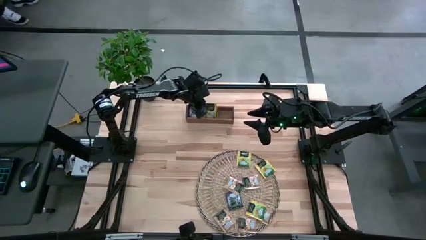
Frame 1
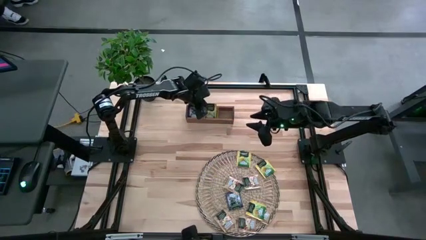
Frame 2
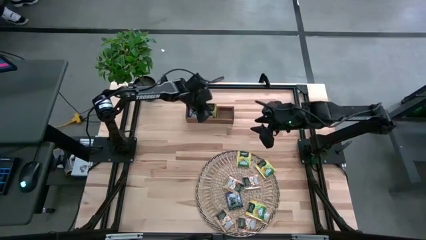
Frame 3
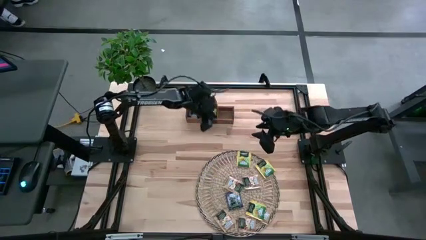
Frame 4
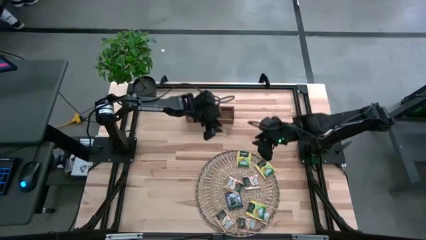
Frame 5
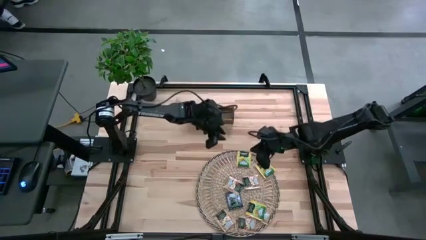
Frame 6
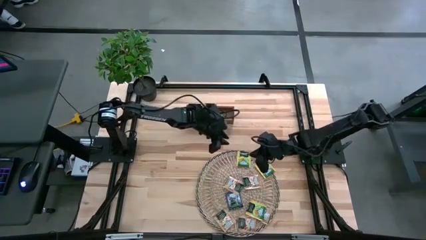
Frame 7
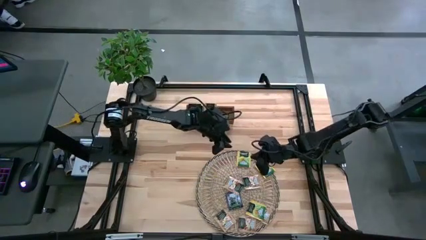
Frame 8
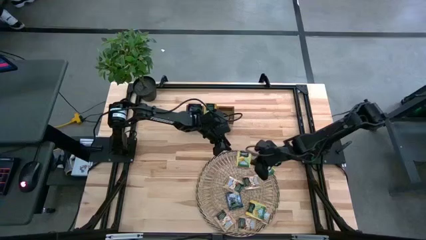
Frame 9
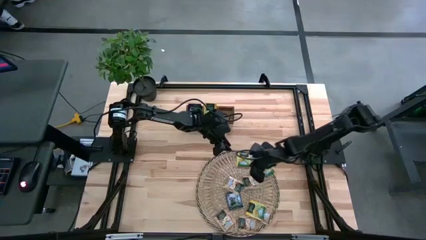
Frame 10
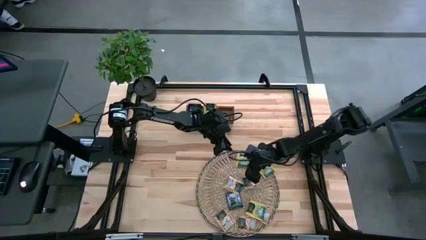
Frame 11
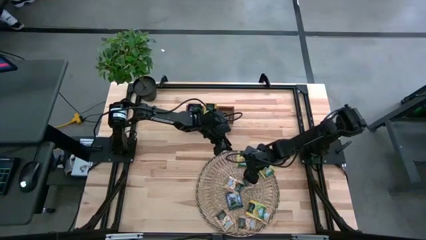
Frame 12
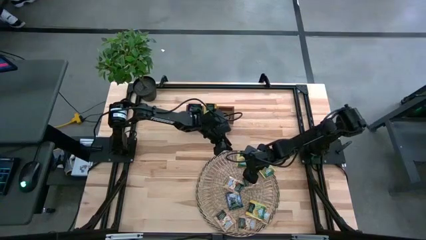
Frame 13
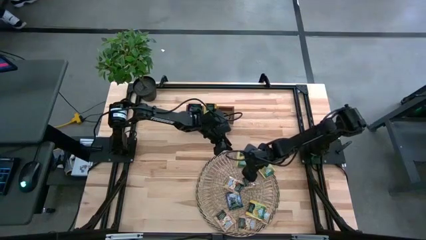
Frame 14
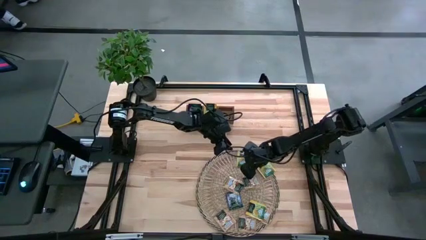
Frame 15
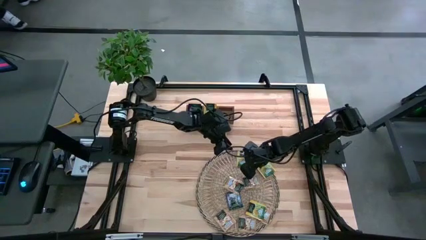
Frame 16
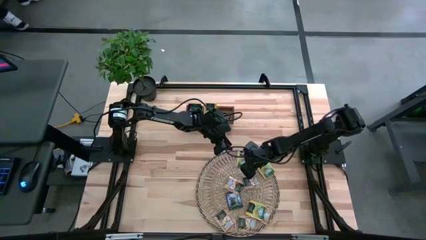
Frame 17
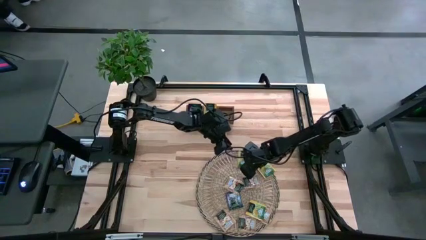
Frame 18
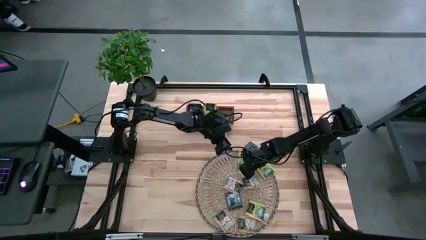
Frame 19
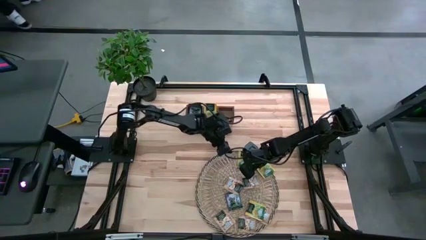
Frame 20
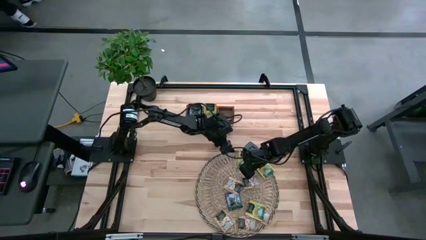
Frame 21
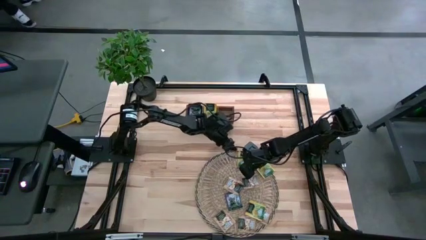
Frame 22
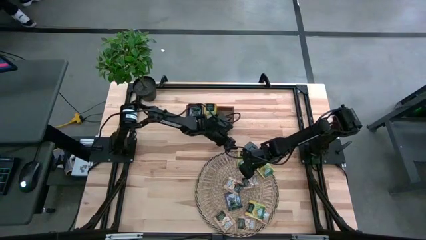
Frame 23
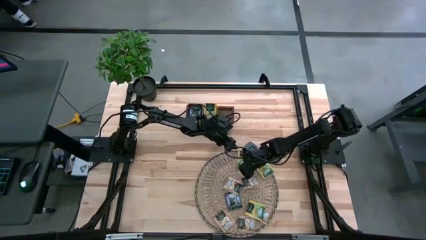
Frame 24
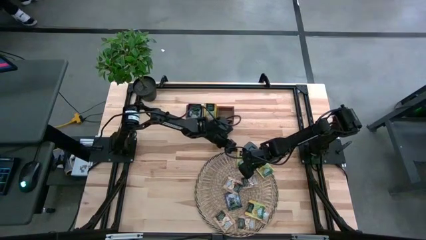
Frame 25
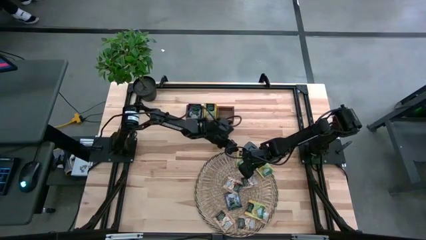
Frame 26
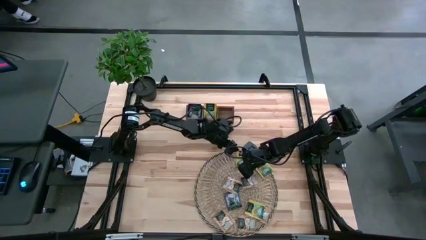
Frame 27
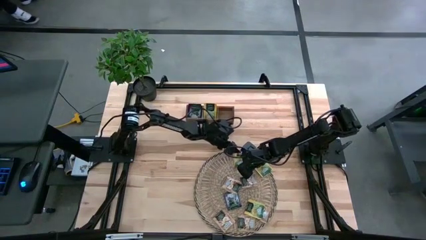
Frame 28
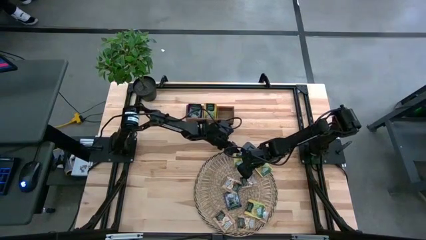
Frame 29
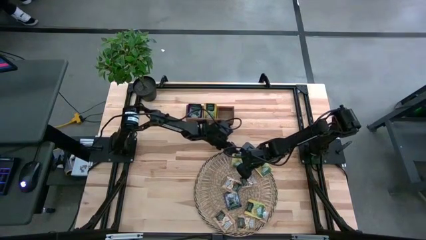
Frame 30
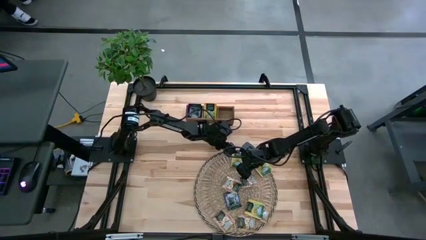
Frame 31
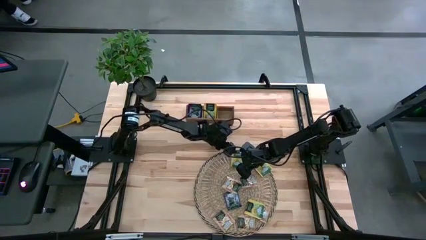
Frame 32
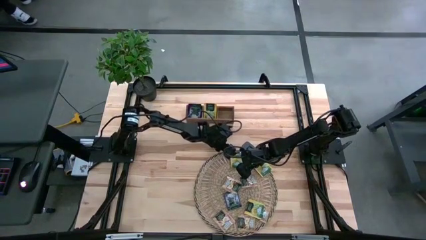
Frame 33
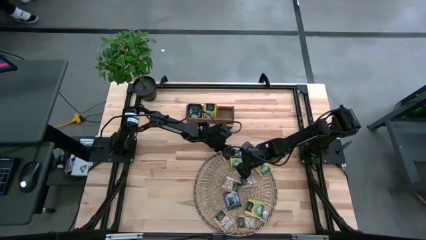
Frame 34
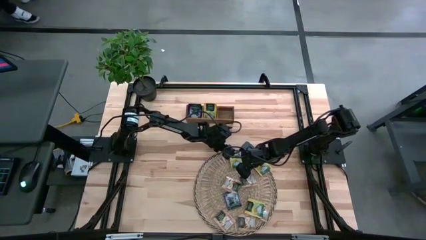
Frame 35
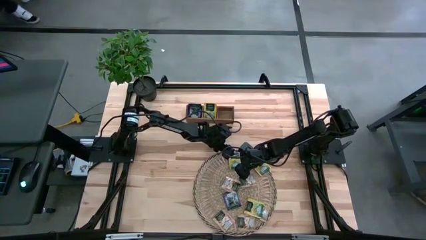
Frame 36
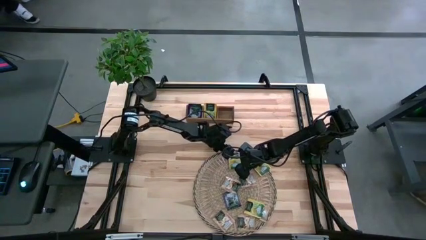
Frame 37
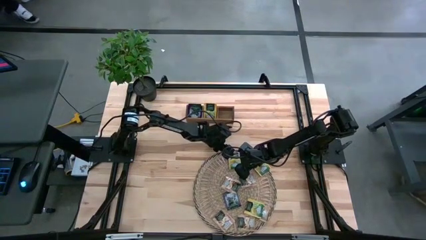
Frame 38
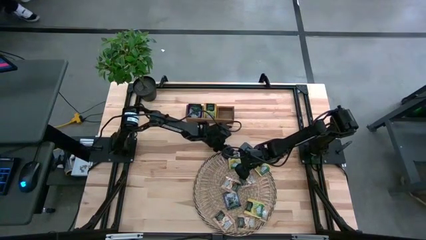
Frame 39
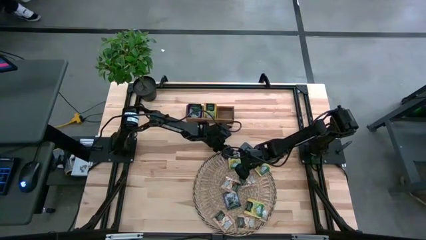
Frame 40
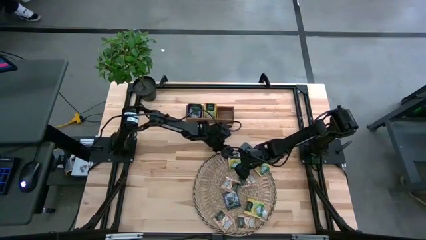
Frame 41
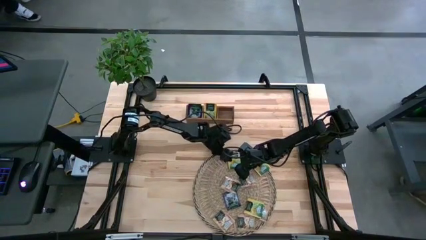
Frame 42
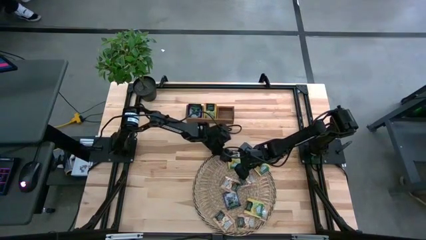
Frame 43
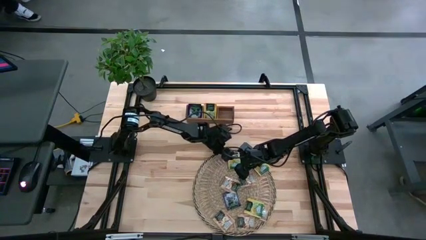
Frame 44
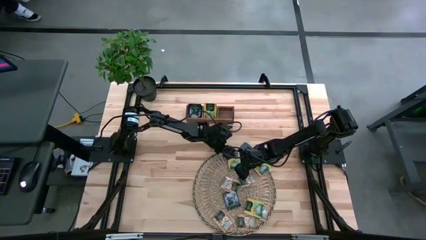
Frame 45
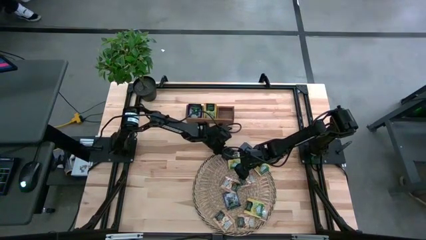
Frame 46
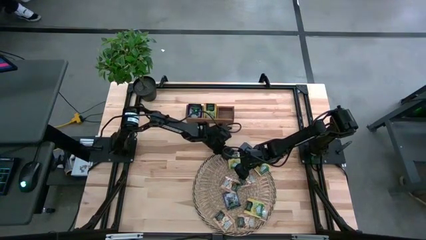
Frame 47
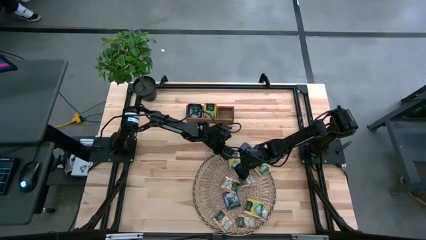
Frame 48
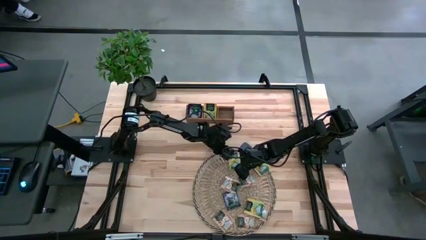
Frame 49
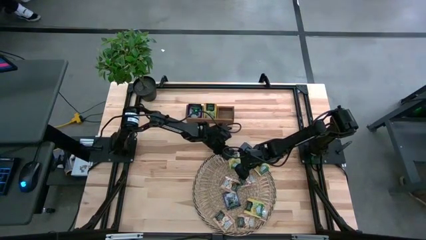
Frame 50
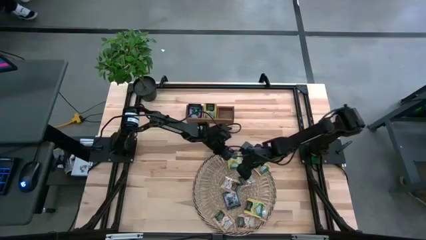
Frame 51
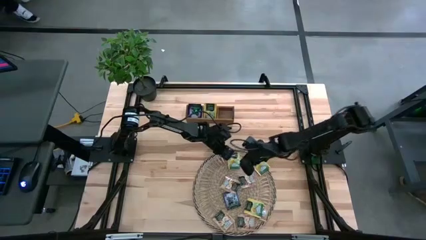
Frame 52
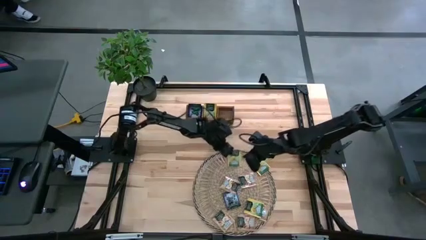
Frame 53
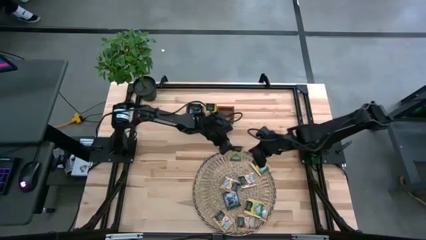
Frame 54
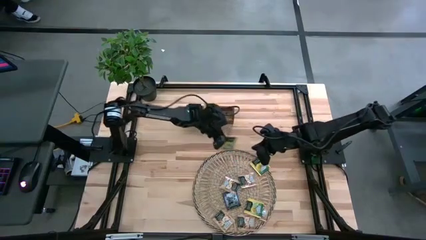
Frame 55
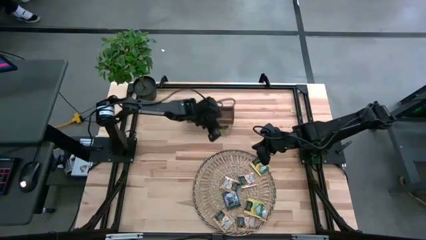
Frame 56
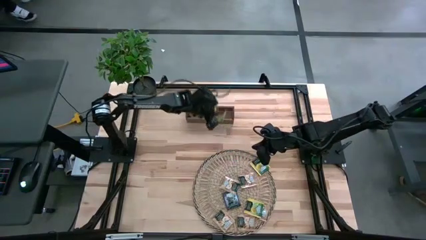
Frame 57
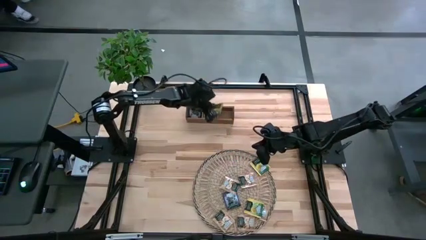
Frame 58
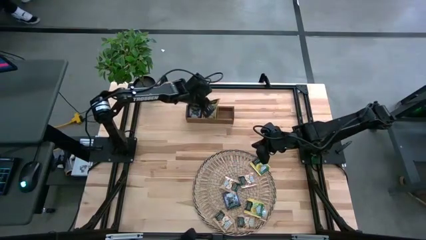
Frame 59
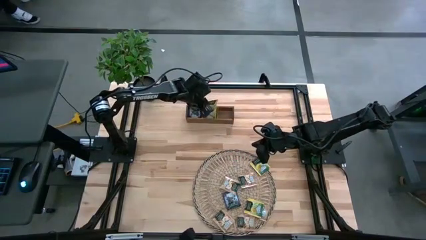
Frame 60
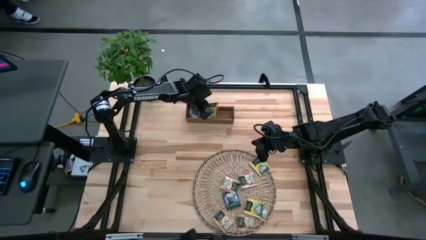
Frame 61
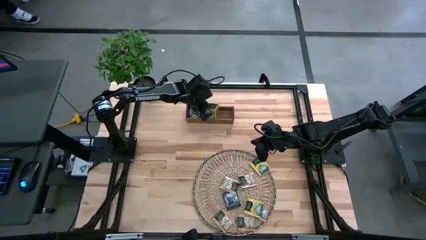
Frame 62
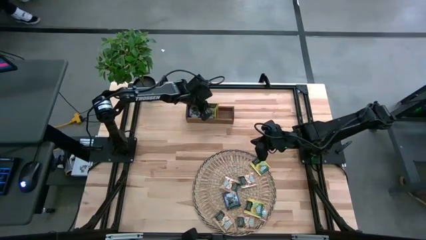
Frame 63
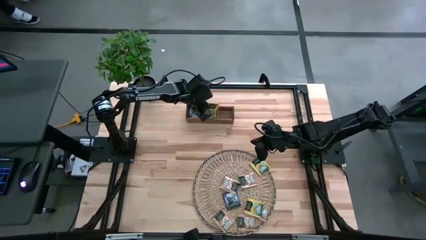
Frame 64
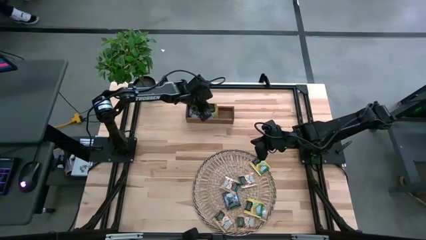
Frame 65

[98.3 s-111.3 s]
Task: Pick & Place Tea
Put the yellow tea bag in the middle section of the wooden organizer

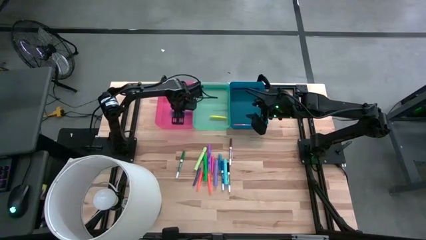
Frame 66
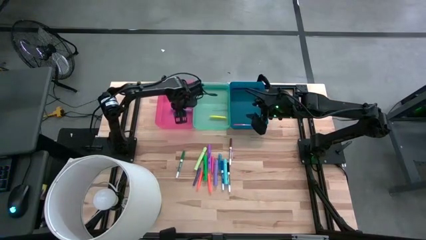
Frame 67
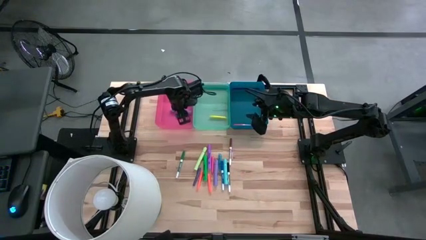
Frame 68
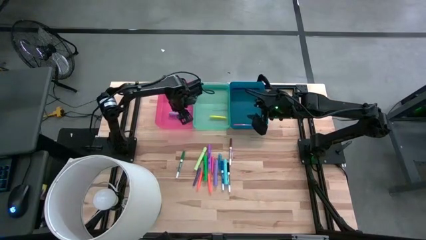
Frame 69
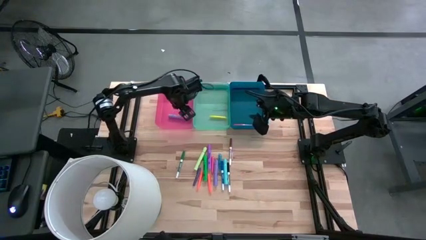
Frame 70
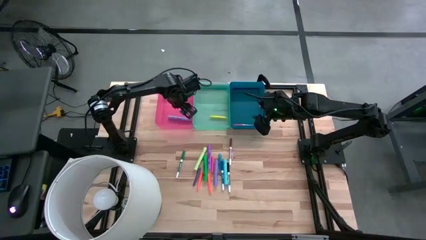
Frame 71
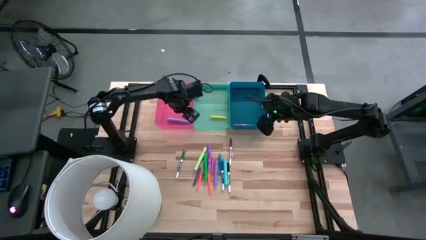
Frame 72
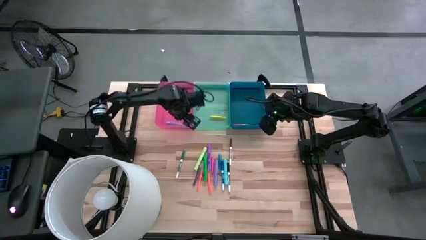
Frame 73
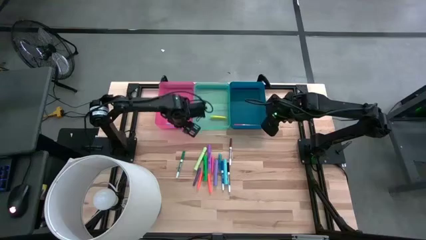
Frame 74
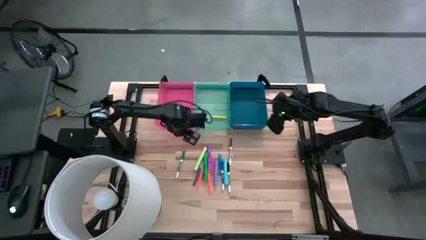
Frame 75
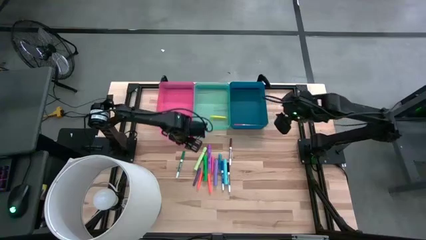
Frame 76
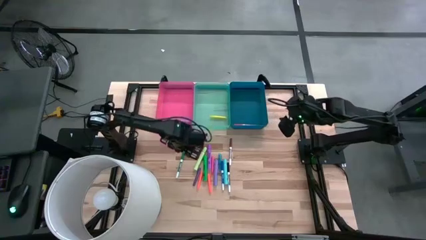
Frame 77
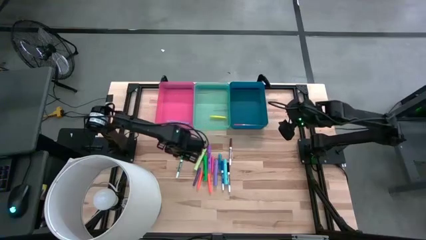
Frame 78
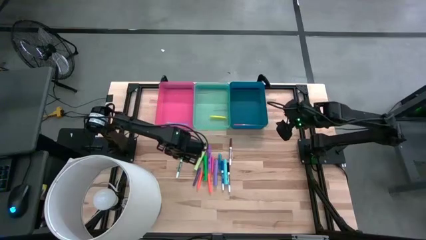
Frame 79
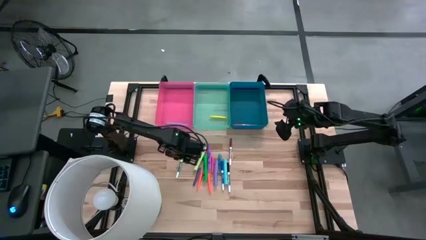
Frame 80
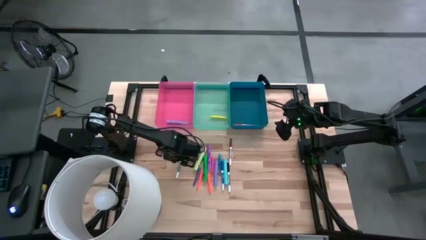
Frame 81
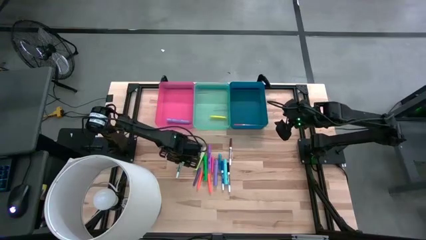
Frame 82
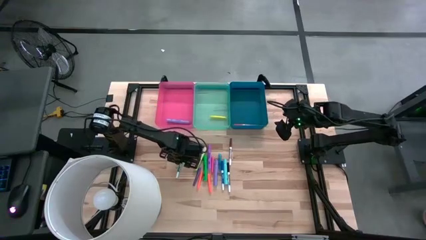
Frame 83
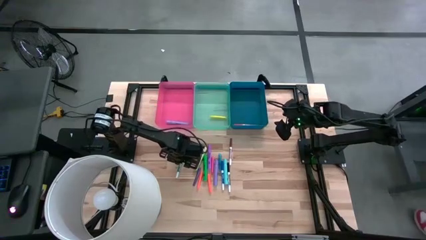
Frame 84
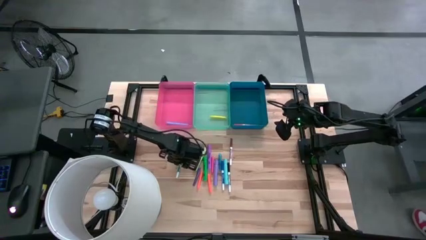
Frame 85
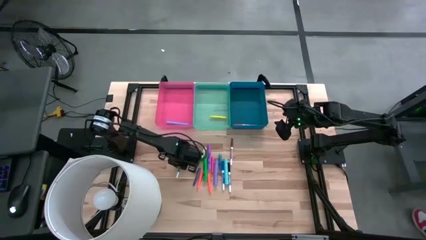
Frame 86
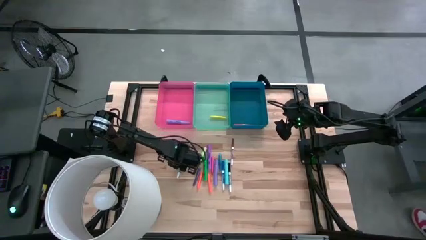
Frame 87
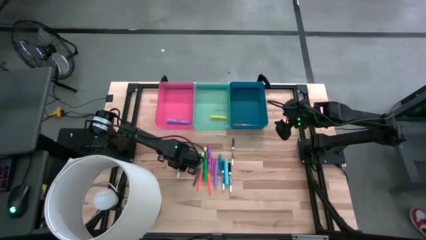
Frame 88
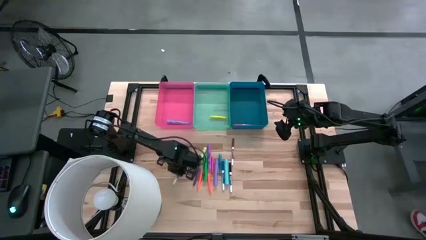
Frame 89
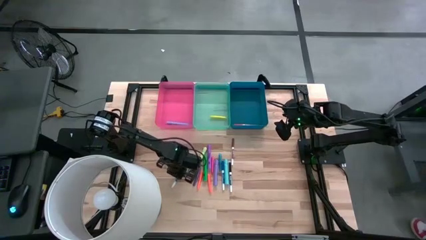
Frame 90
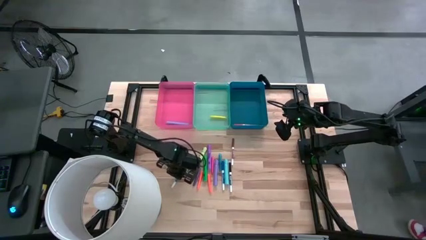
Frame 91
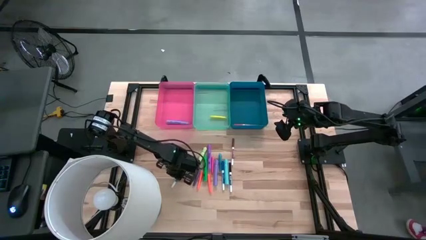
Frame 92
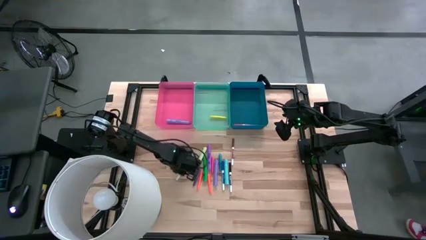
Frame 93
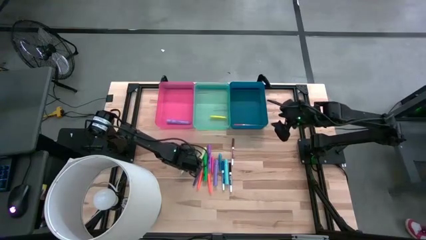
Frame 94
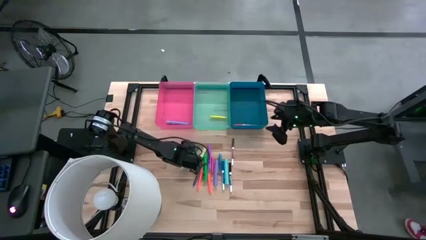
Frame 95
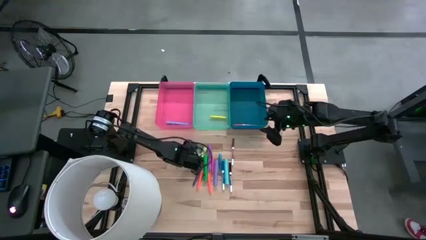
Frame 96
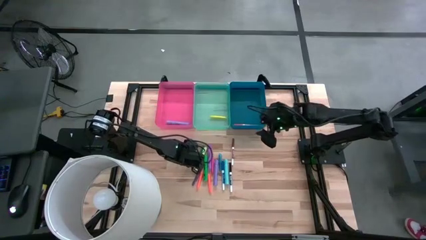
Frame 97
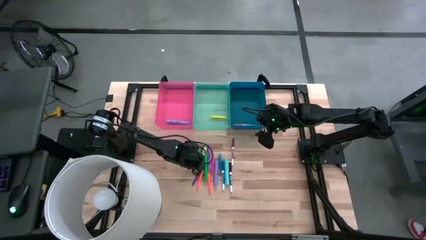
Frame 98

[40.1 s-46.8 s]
Task: Pick & Place Markers
Put the green highlighter into the blue bin
